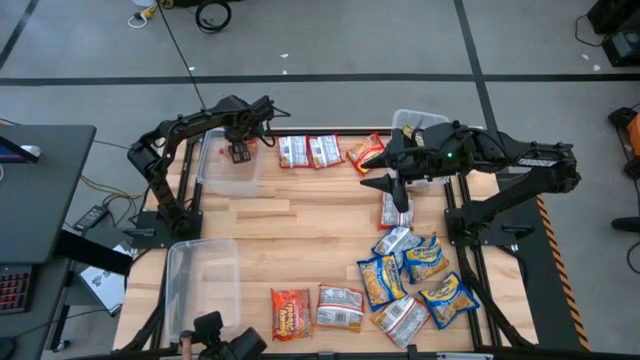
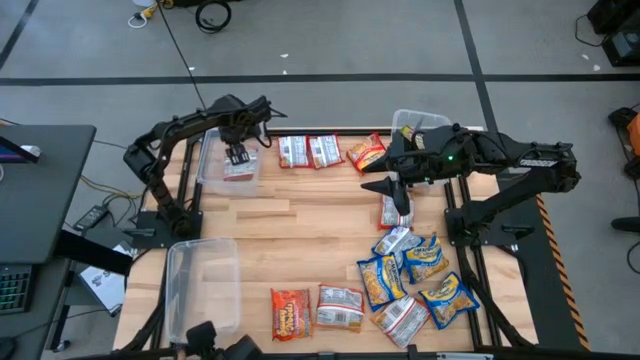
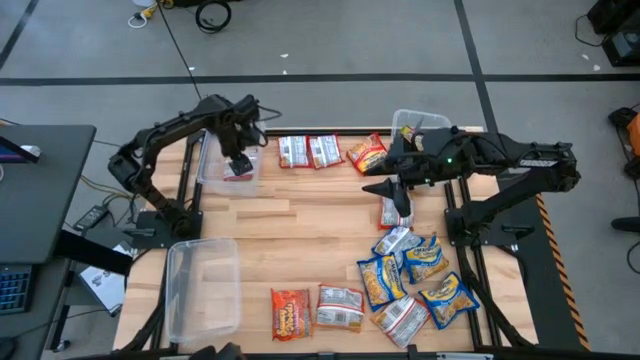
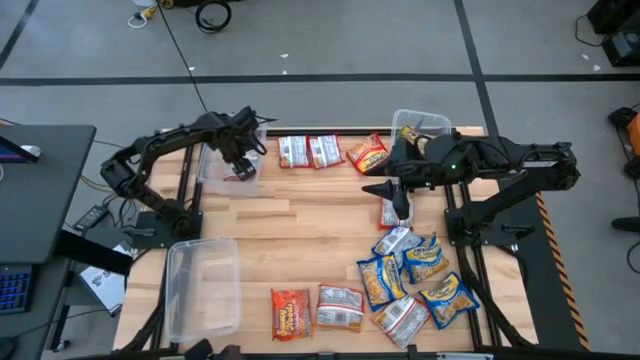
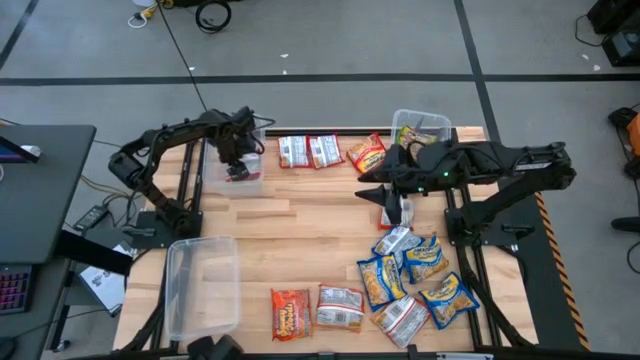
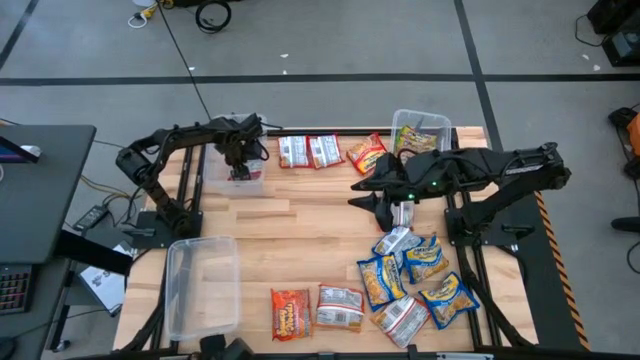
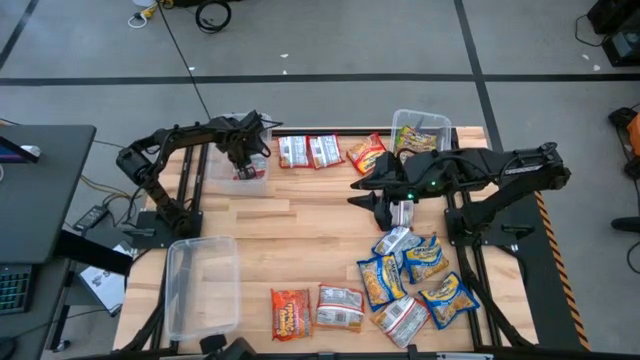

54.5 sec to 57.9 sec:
Task: Sort Maruchan noodles
Adjust the orange noodle pack in the top left transparent bin

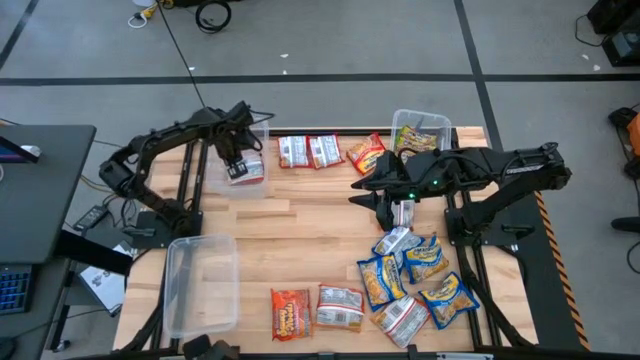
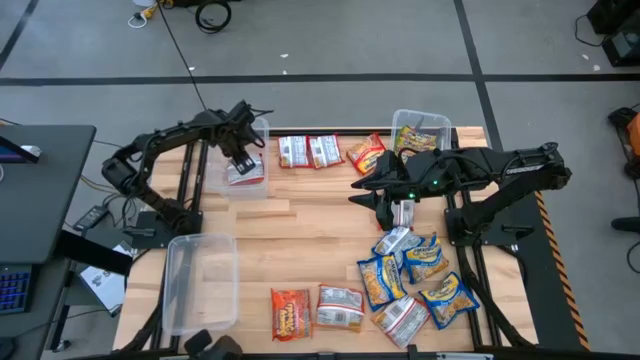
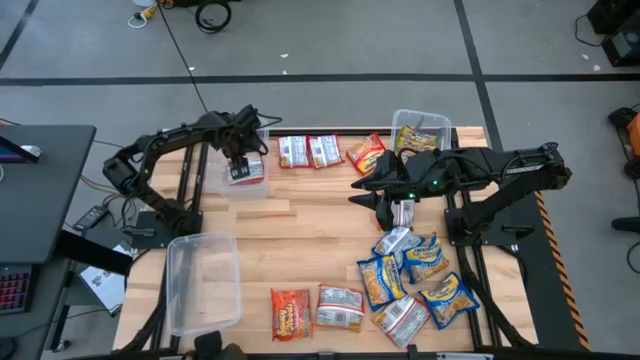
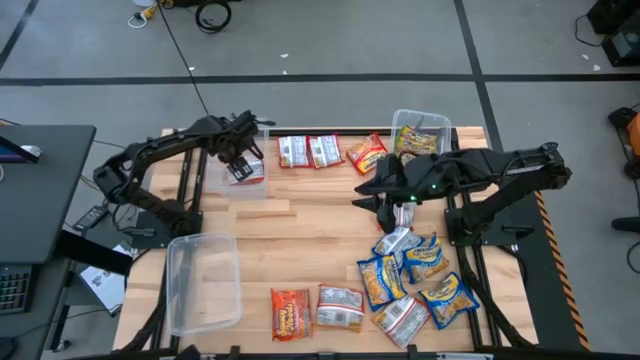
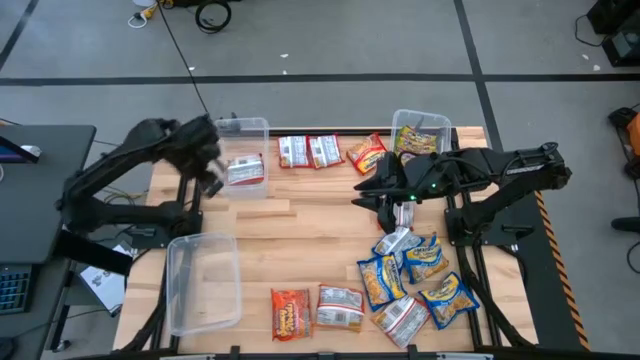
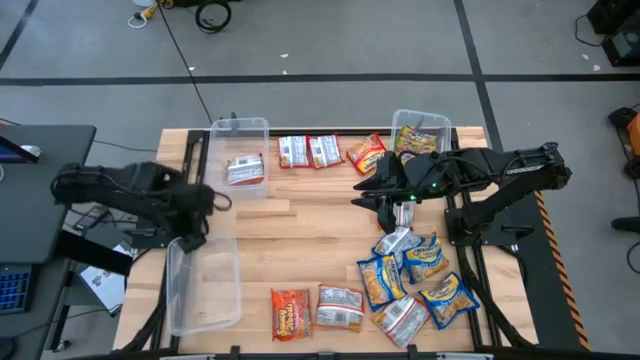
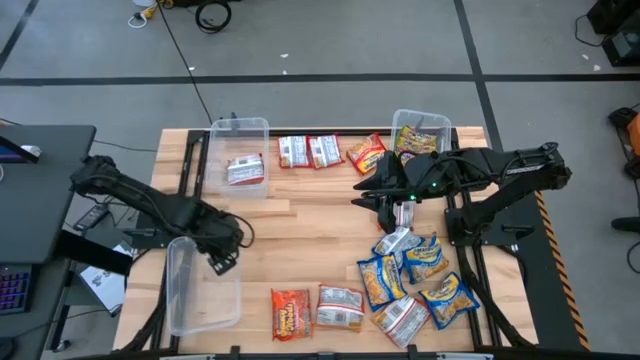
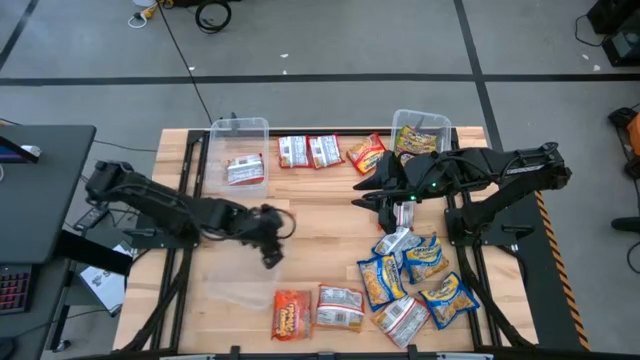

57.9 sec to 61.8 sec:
Adjust the bottom transparent bin on the table

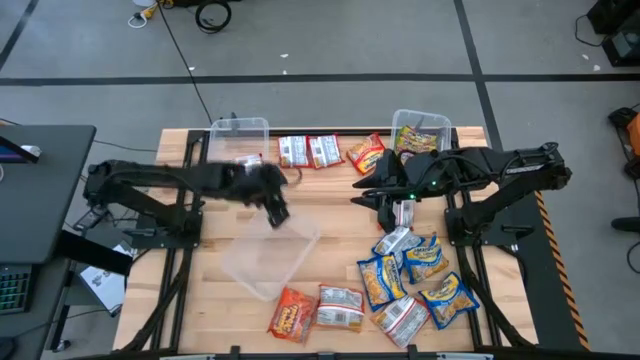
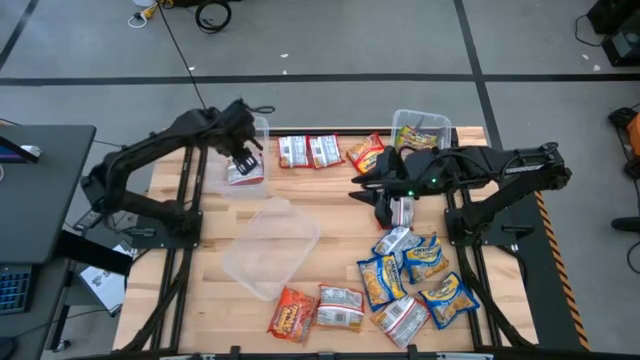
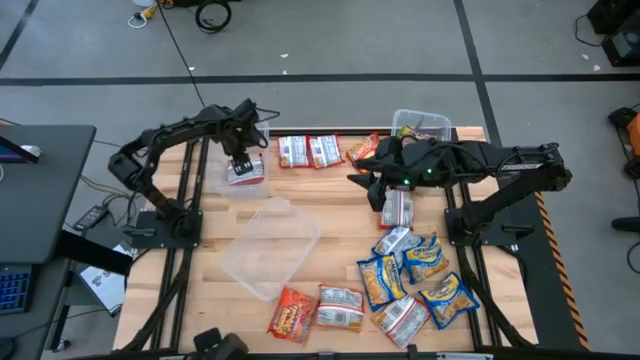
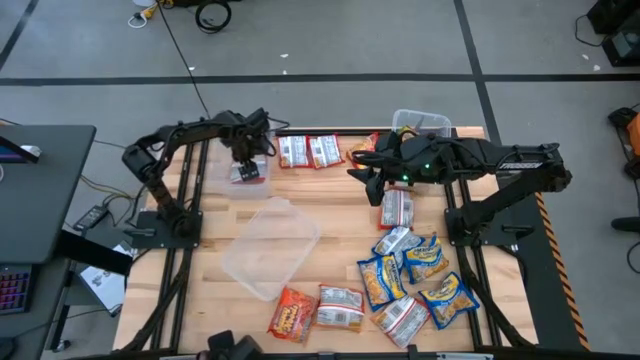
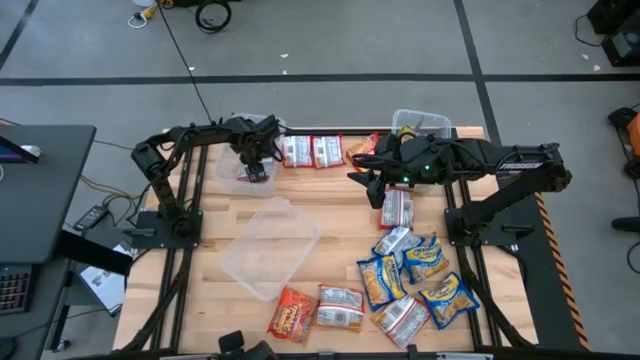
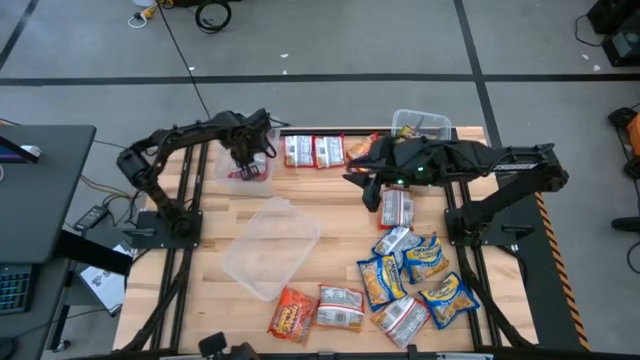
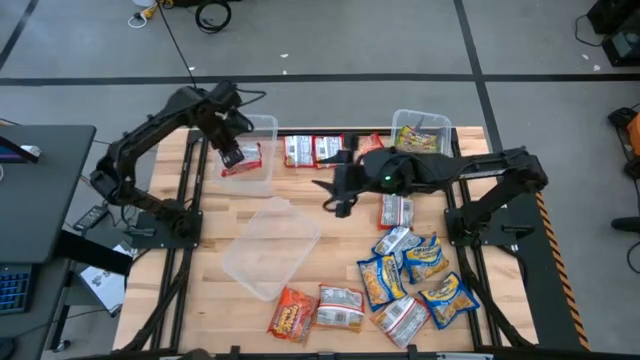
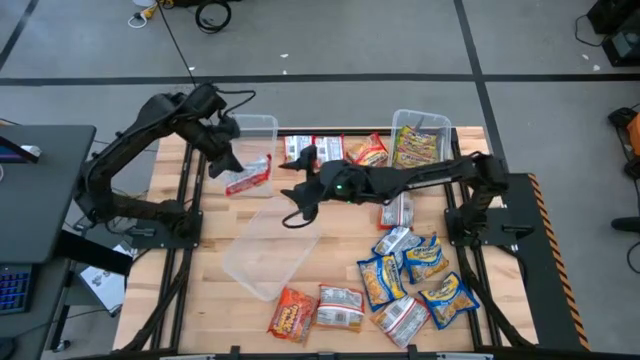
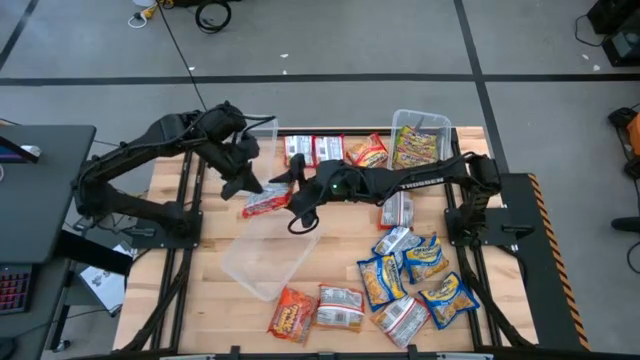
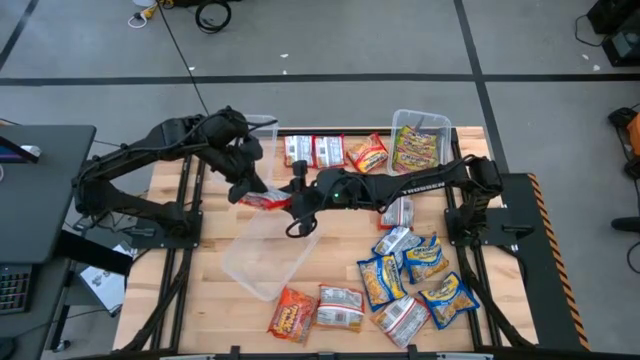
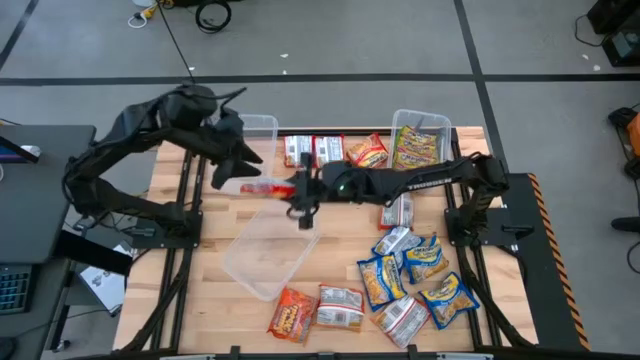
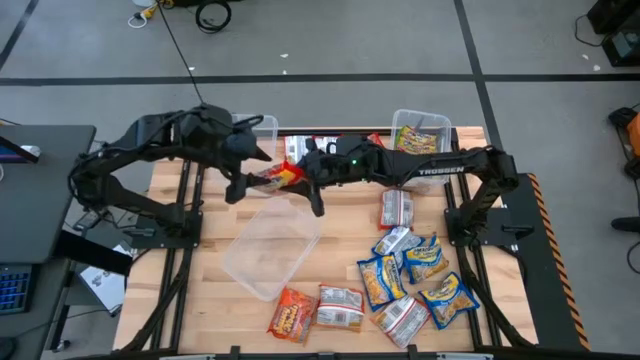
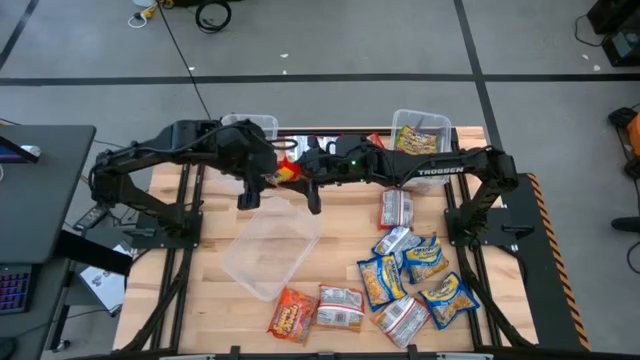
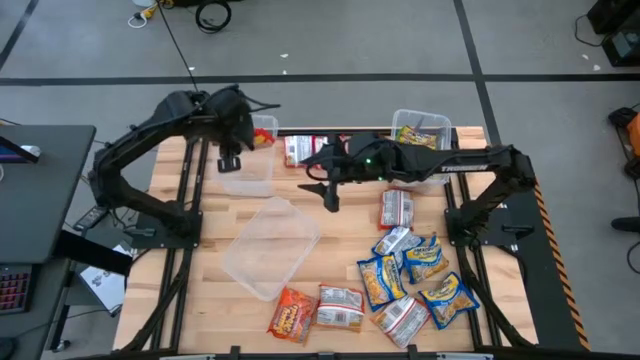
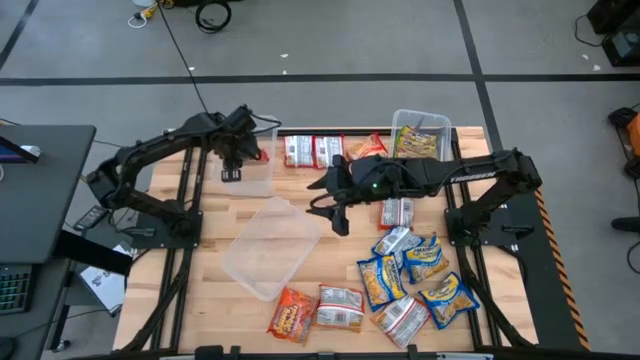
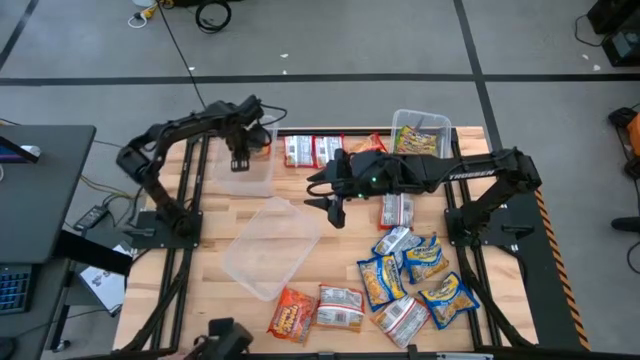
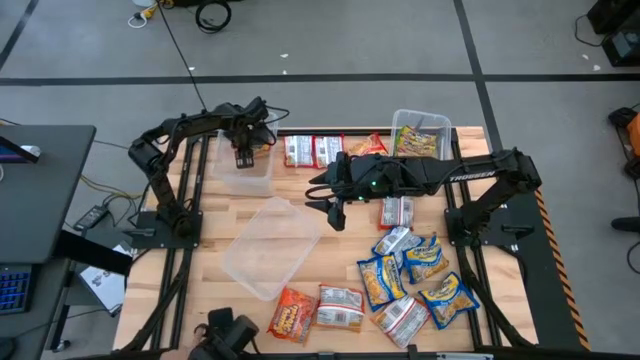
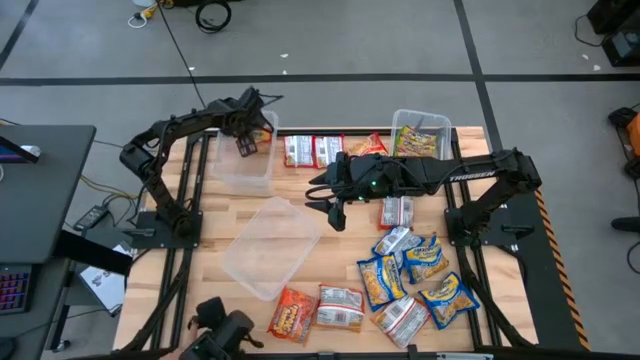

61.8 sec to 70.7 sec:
Adjust the orange noodle pack in the top left transparent bin

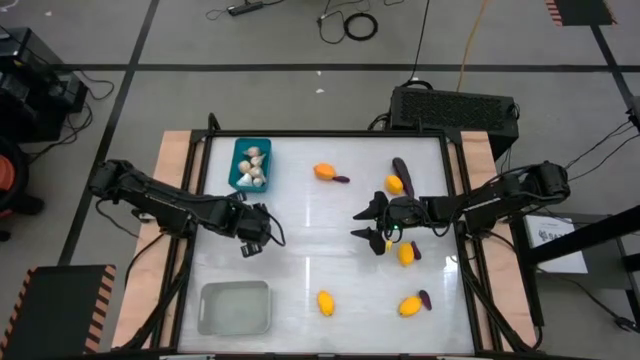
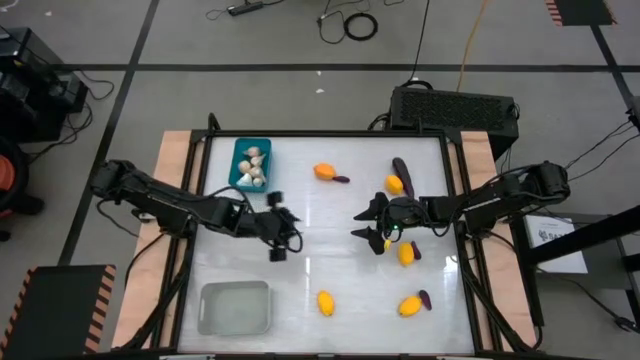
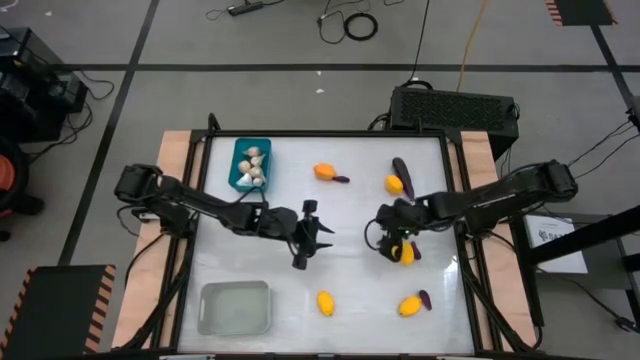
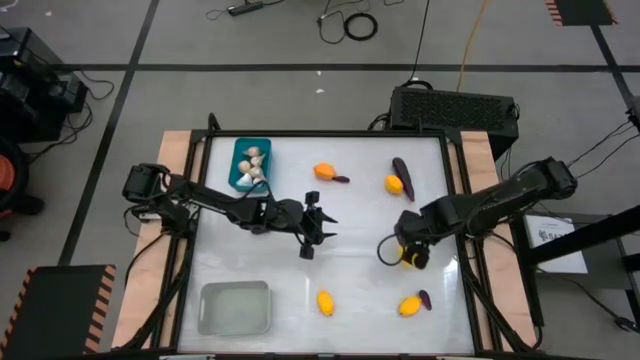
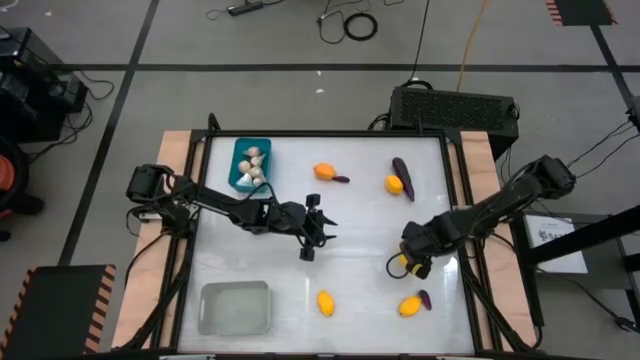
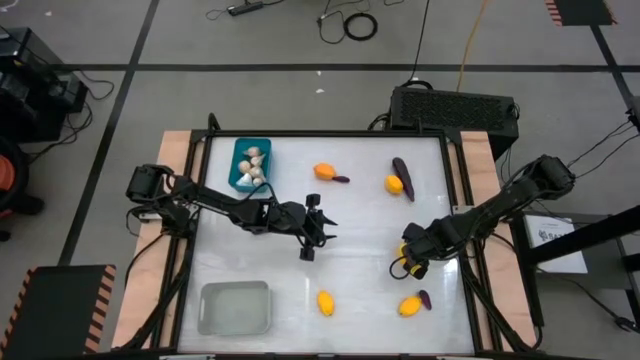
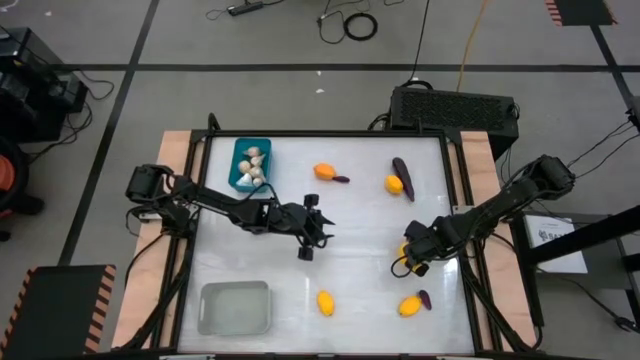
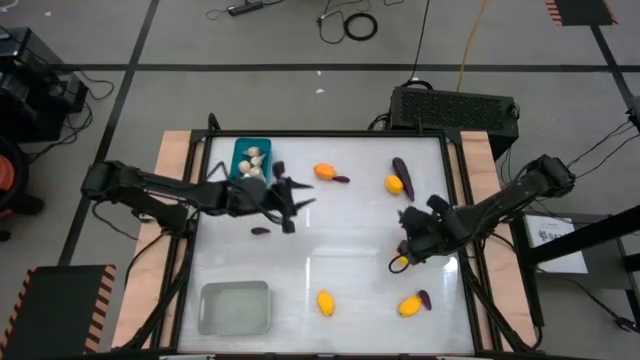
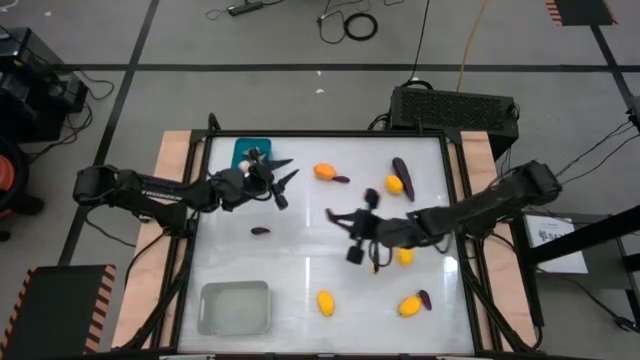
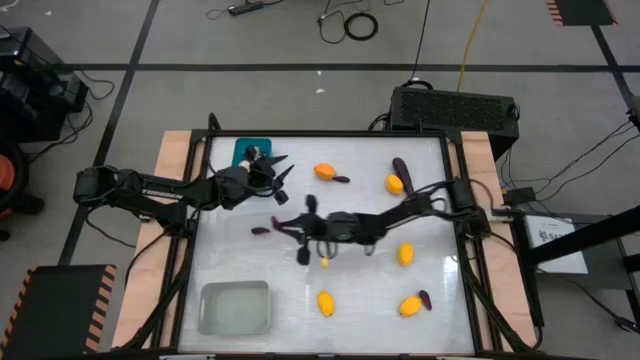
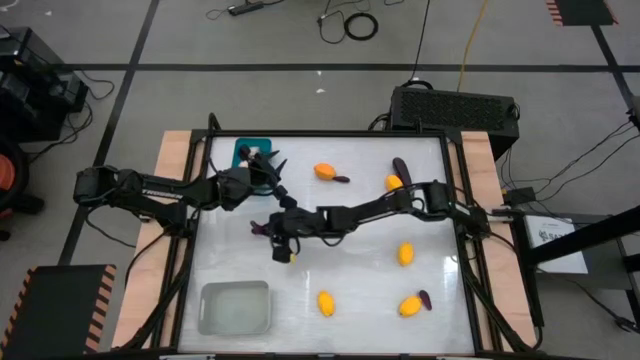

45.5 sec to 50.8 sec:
Task: Sort produce into baskets
Put the eggplant into the transparent bin
